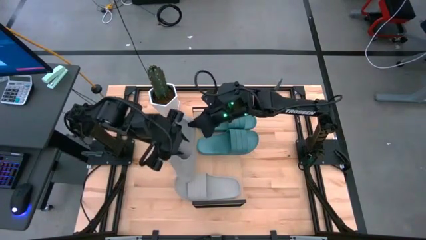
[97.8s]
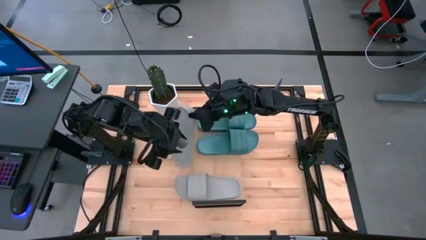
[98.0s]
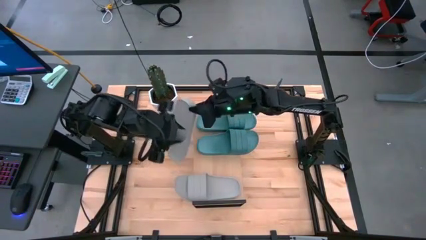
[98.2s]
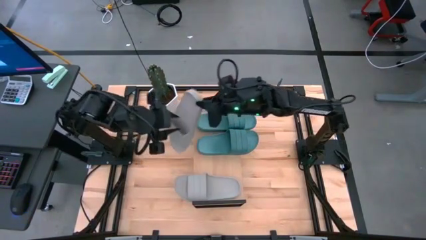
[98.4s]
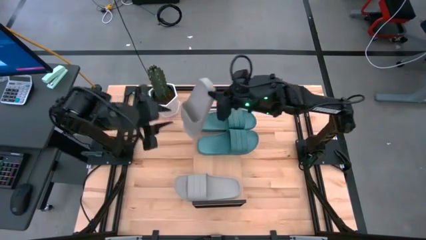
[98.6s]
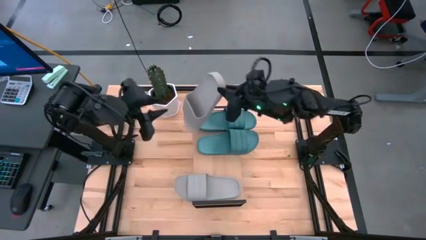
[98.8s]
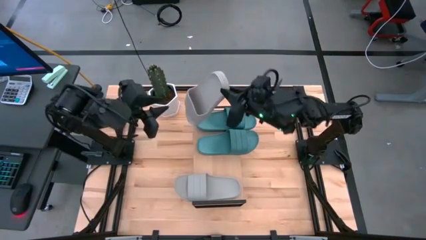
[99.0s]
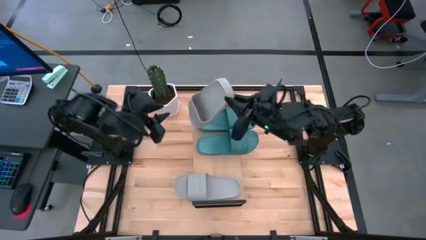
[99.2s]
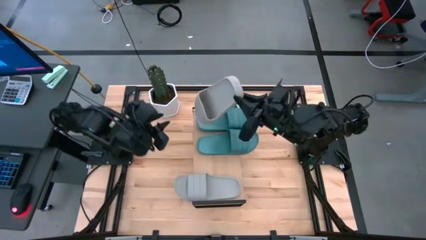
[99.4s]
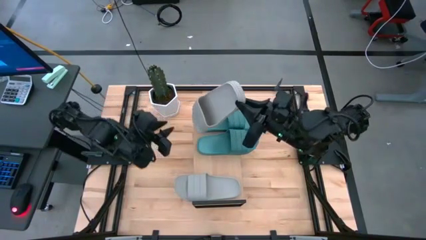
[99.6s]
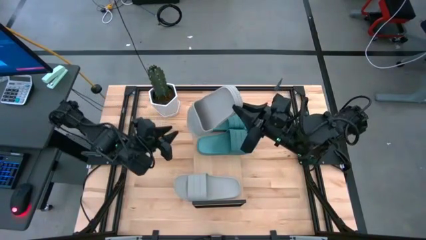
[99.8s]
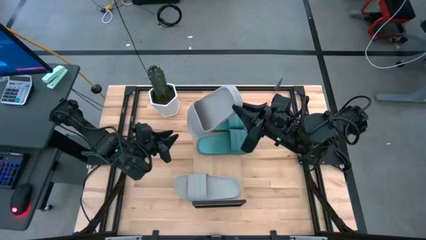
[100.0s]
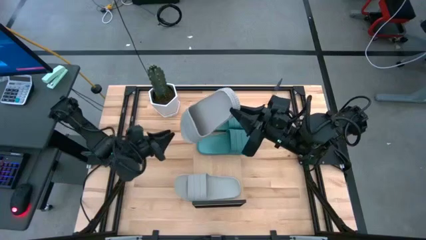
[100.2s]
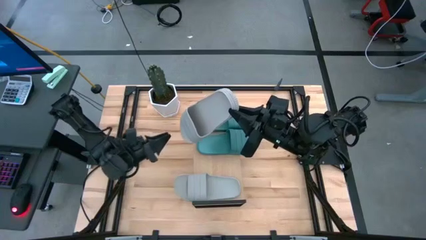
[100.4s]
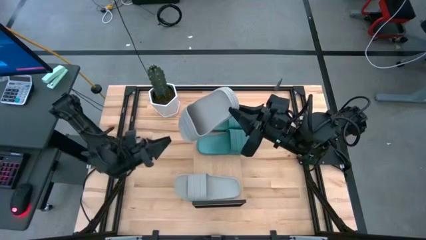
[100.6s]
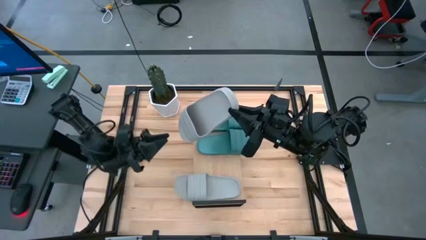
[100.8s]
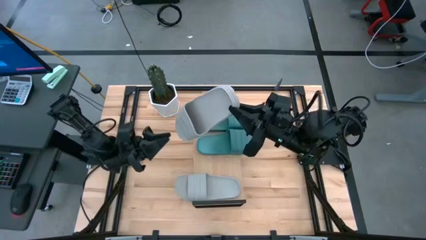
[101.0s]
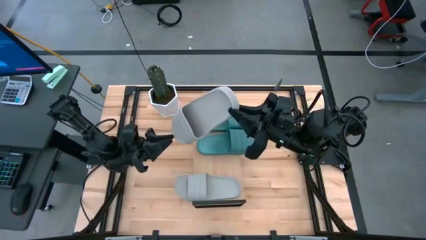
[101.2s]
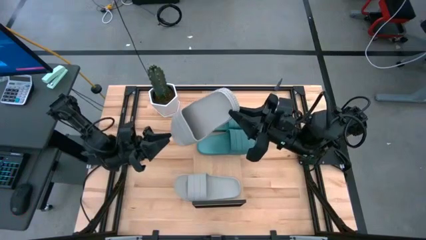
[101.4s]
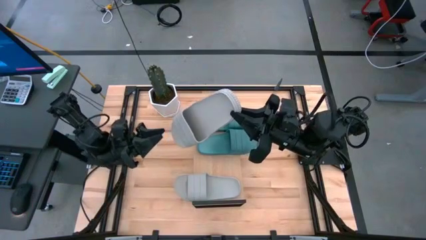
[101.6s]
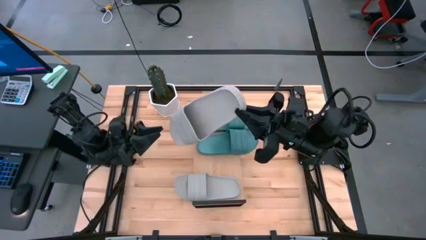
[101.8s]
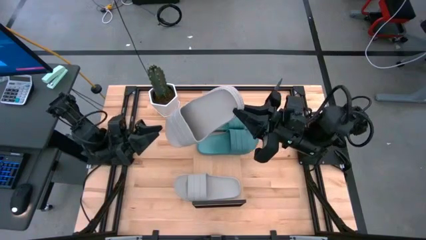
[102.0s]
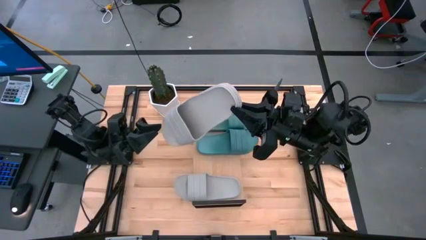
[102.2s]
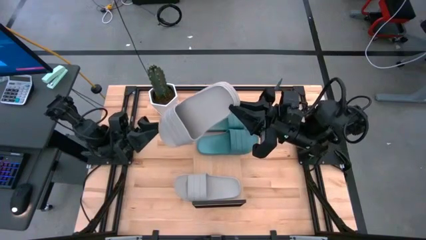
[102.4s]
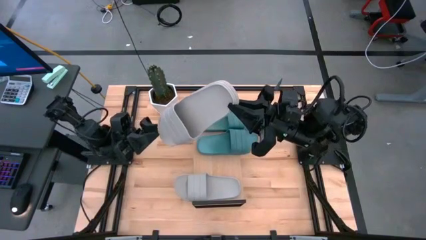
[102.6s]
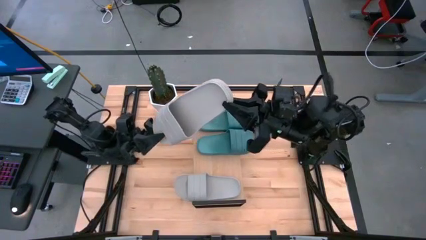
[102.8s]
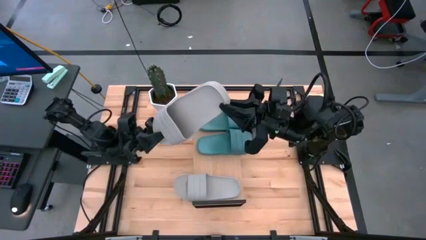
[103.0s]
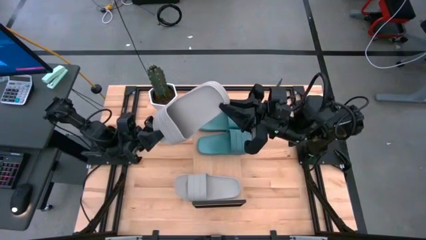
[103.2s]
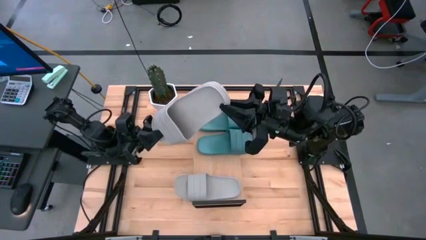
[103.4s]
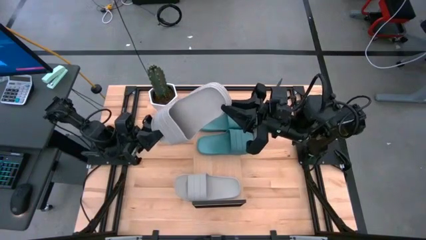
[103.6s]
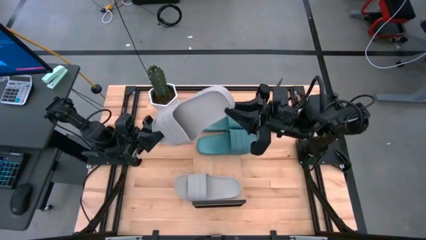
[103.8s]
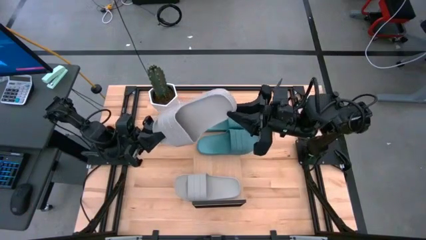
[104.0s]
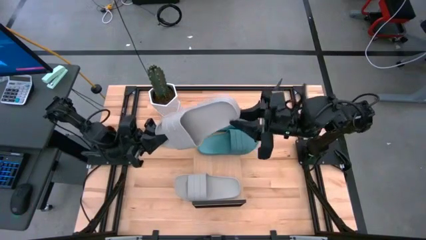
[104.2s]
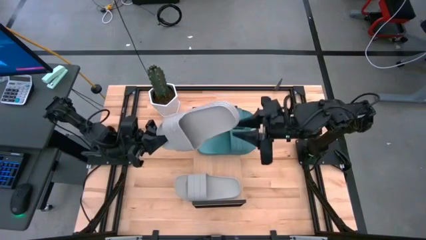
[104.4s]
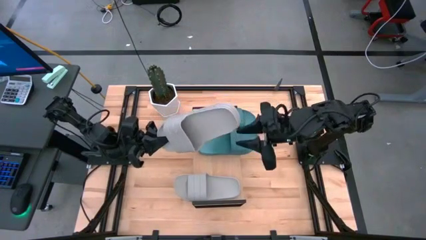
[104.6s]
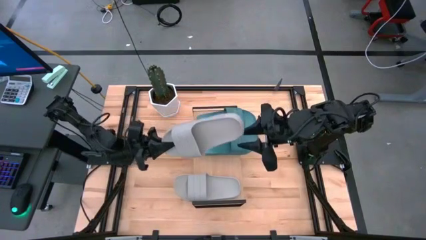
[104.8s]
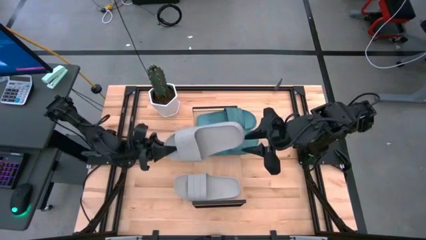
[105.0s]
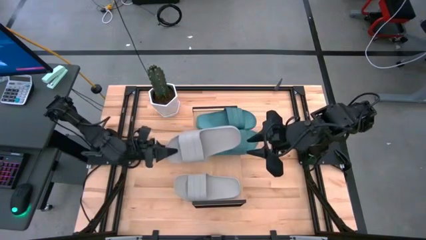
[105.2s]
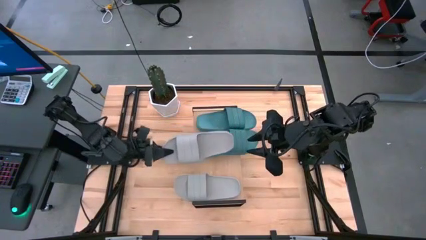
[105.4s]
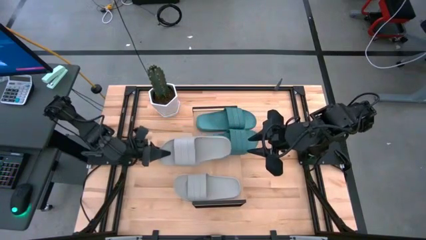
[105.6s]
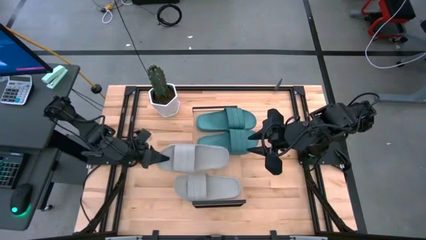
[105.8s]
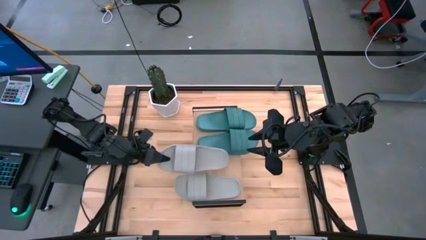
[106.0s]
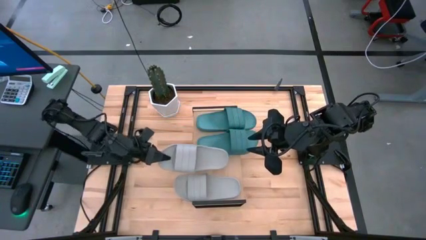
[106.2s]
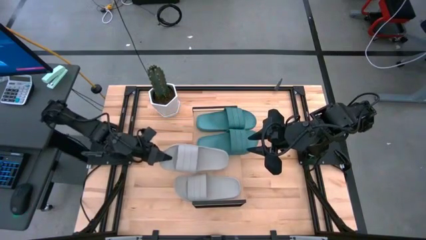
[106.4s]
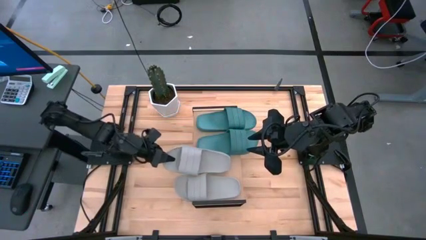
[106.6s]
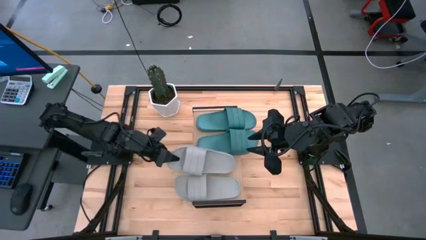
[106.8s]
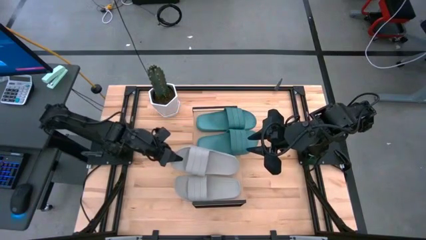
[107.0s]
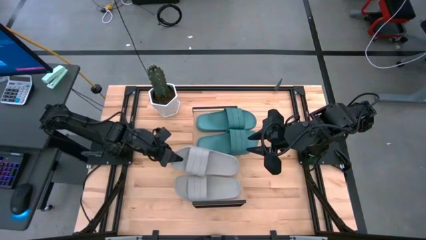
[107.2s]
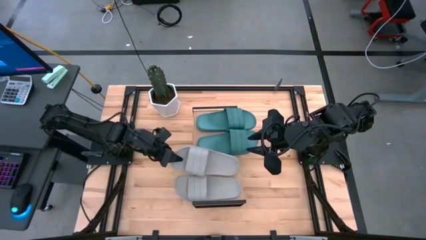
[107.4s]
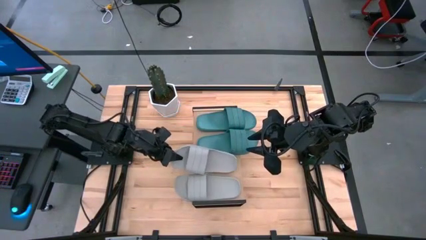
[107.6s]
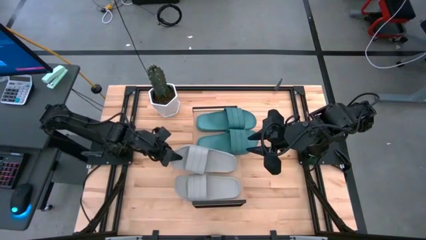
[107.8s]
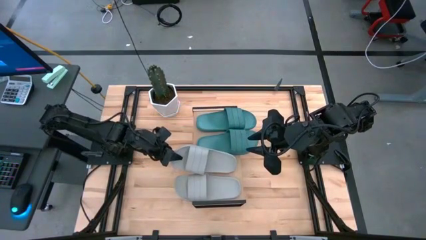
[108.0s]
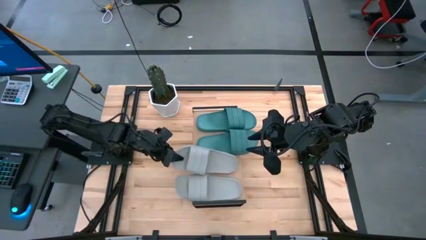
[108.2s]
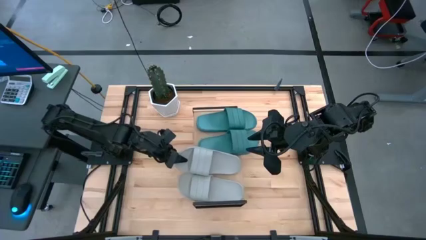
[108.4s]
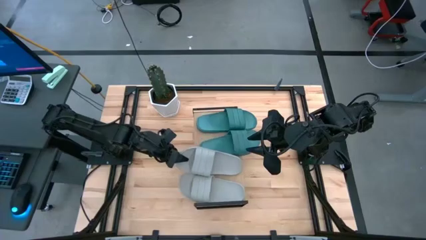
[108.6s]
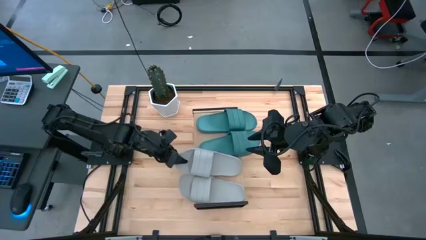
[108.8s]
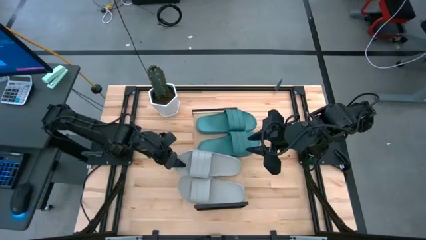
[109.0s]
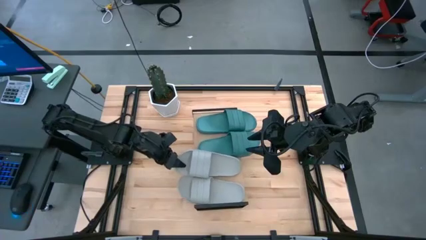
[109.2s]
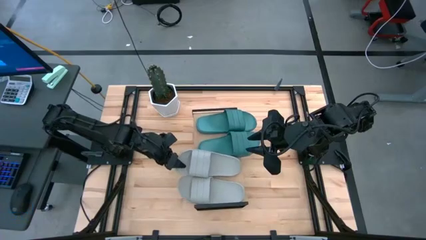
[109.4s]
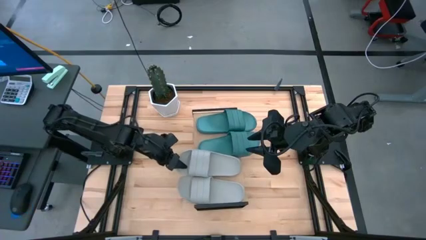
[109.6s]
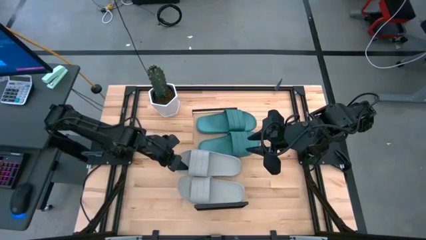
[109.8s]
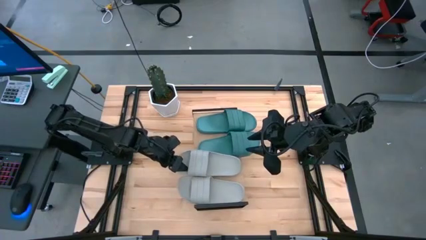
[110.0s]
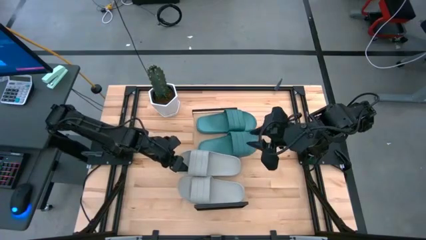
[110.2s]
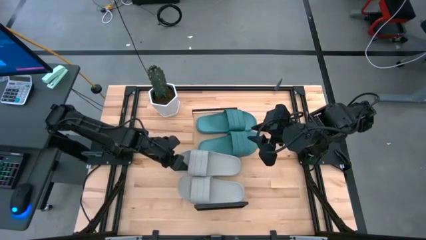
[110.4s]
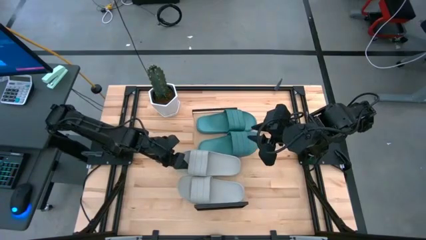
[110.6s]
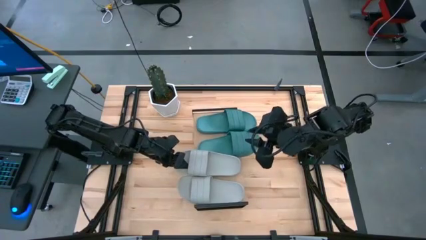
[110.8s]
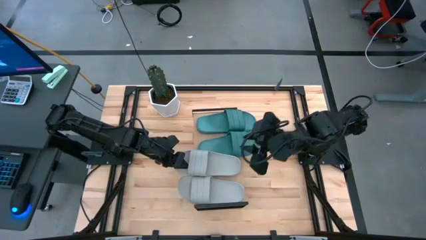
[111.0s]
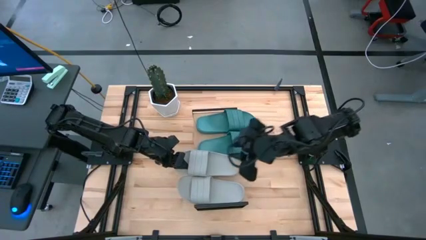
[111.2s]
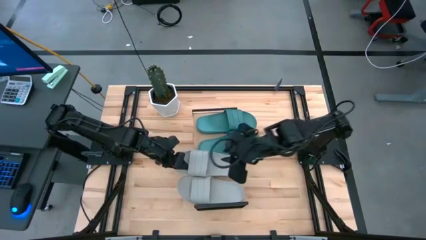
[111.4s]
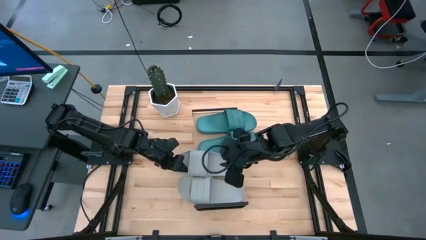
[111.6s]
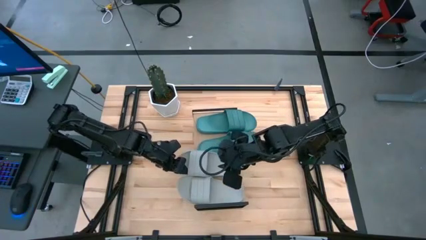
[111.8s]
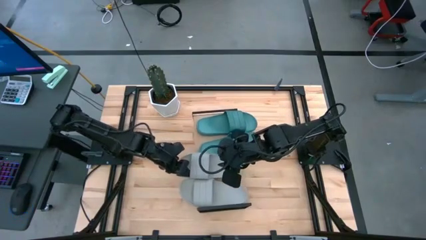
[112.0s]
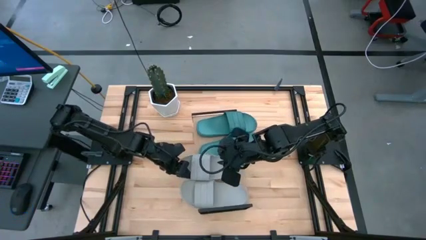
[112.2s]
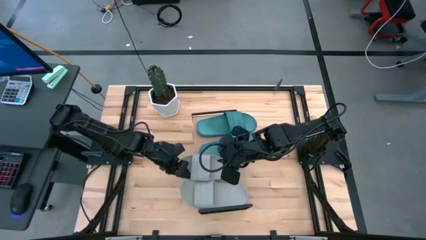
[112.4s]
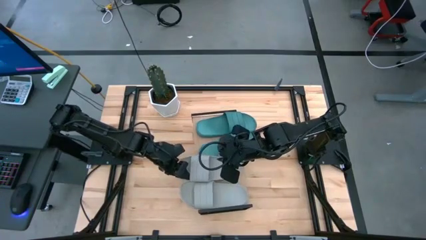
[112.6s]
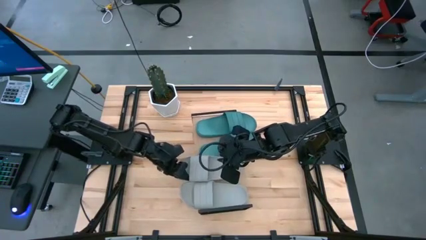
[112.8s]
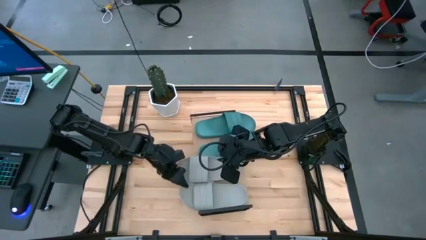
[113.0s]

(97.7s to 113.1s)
Task: Pick and place slides into the shelf
Put the gray slide on the shelf
